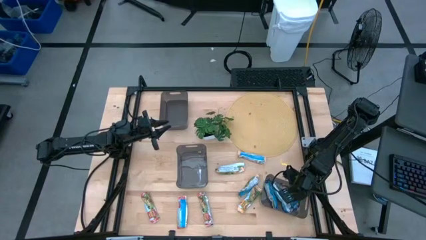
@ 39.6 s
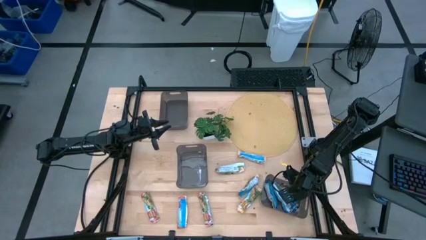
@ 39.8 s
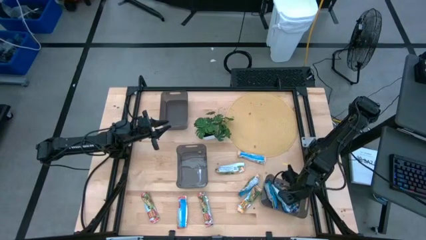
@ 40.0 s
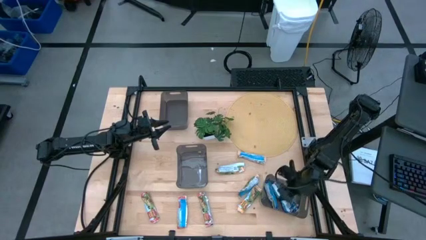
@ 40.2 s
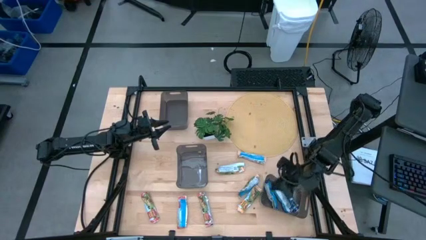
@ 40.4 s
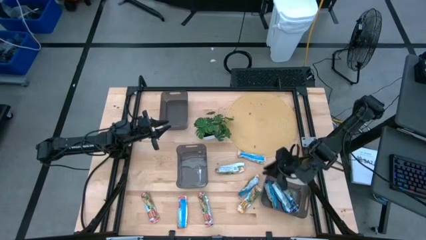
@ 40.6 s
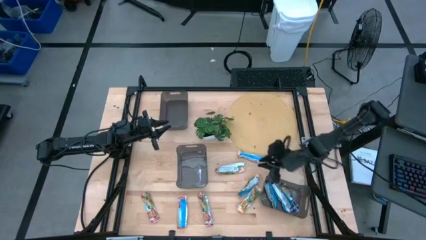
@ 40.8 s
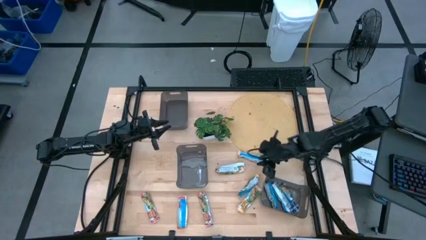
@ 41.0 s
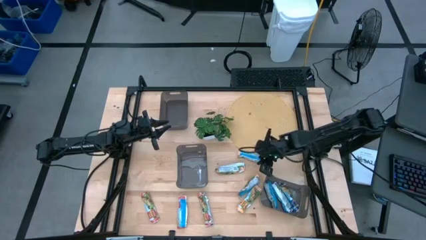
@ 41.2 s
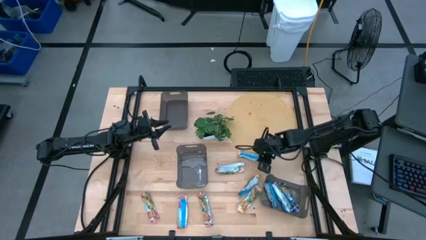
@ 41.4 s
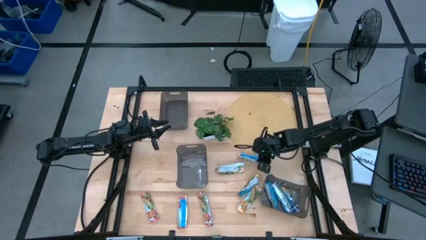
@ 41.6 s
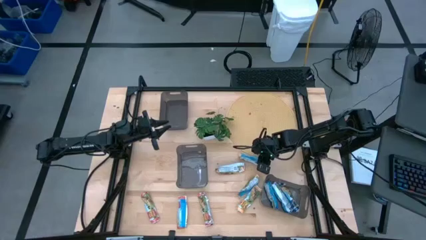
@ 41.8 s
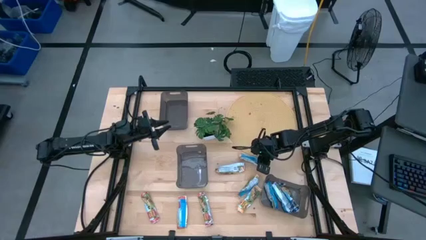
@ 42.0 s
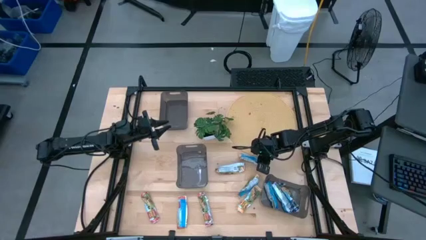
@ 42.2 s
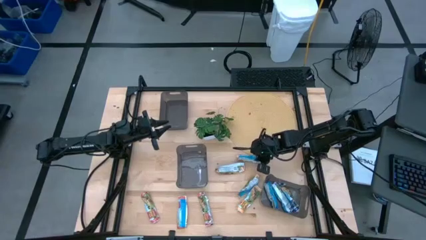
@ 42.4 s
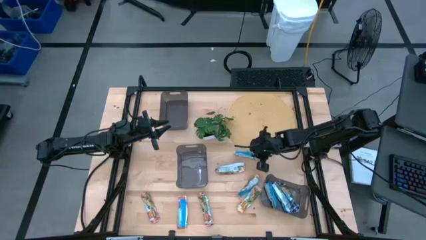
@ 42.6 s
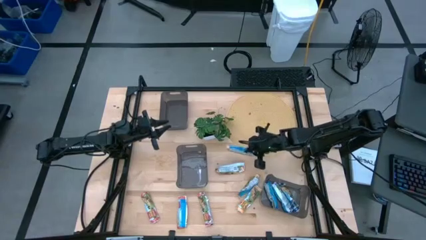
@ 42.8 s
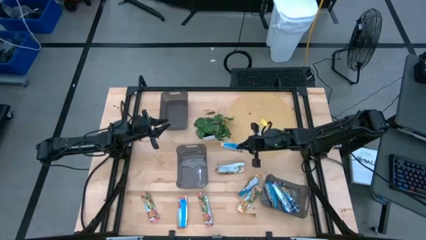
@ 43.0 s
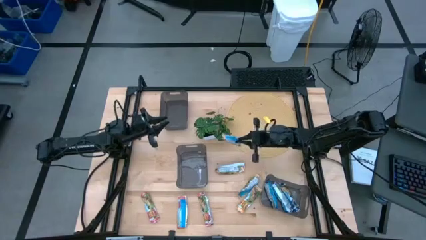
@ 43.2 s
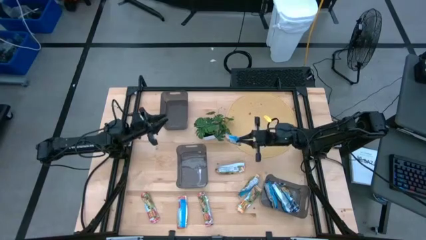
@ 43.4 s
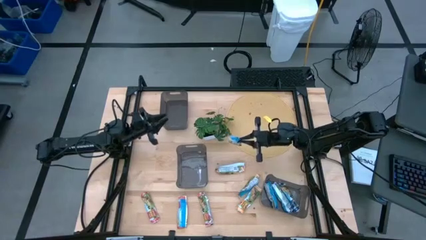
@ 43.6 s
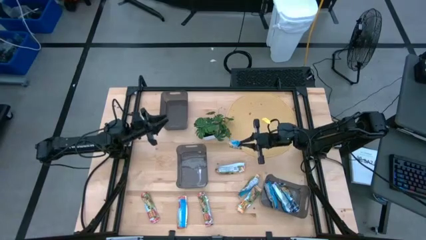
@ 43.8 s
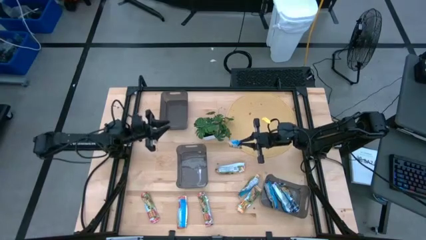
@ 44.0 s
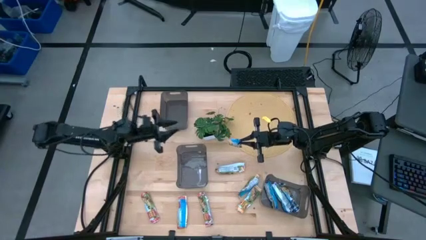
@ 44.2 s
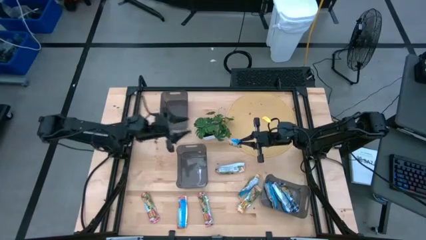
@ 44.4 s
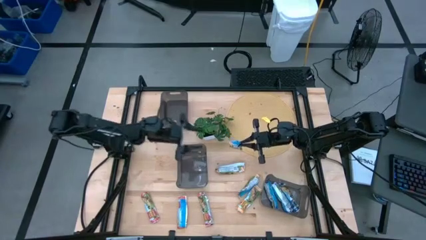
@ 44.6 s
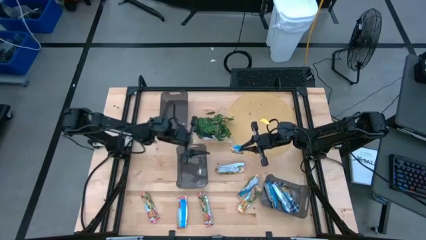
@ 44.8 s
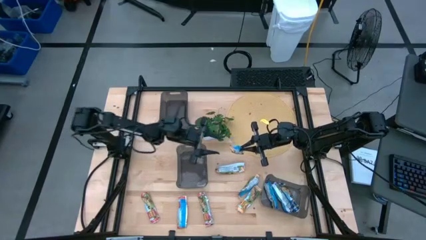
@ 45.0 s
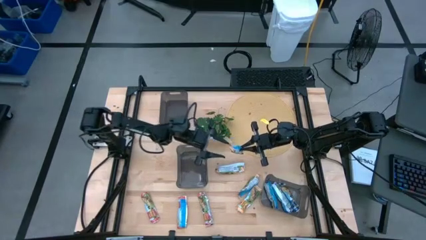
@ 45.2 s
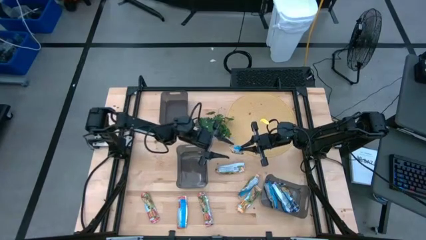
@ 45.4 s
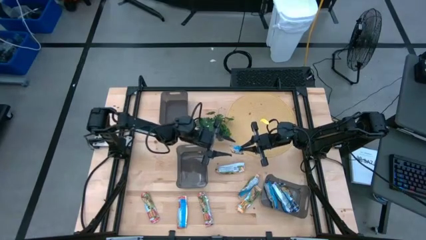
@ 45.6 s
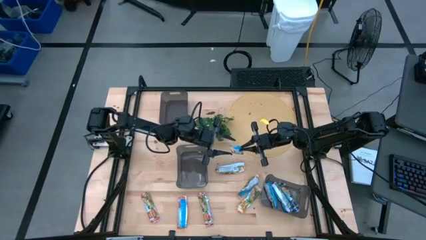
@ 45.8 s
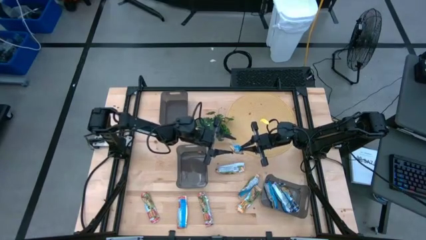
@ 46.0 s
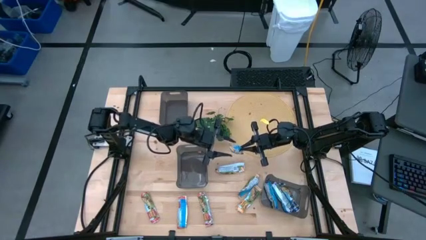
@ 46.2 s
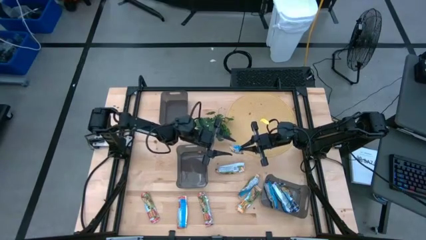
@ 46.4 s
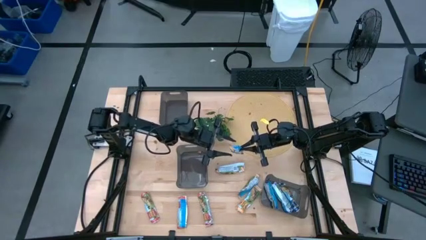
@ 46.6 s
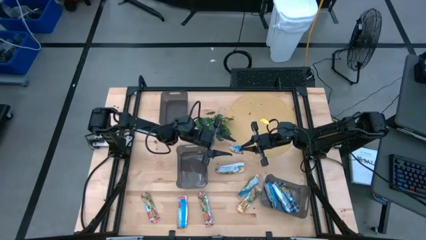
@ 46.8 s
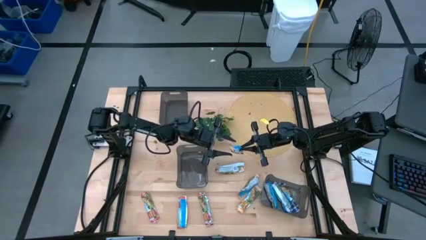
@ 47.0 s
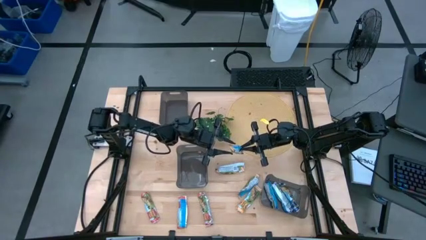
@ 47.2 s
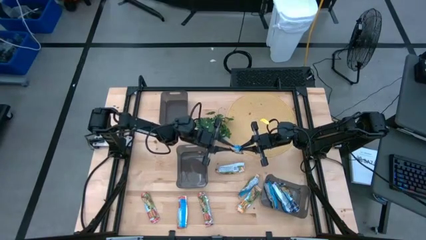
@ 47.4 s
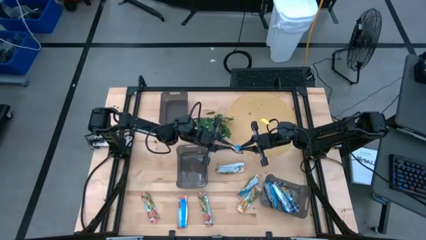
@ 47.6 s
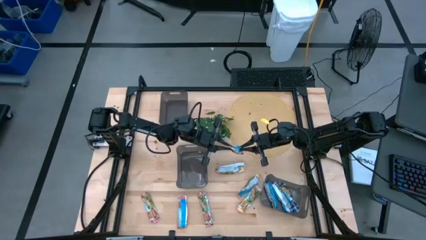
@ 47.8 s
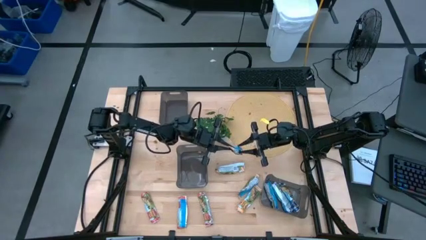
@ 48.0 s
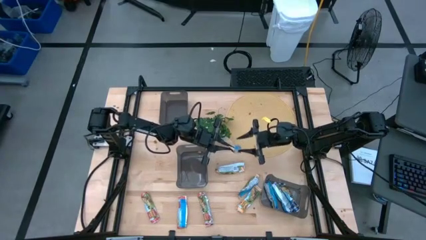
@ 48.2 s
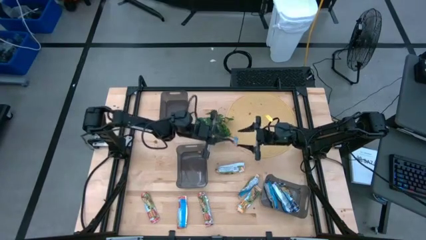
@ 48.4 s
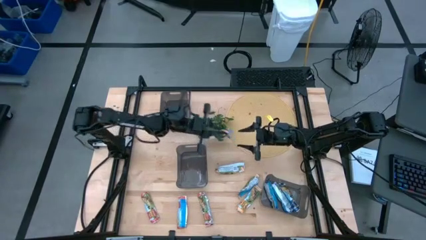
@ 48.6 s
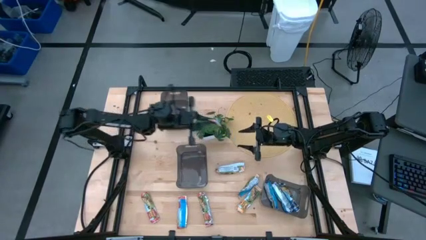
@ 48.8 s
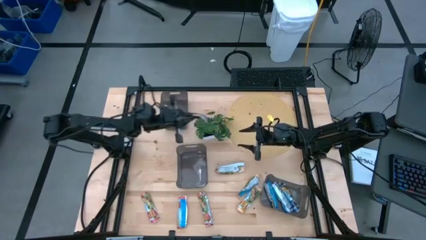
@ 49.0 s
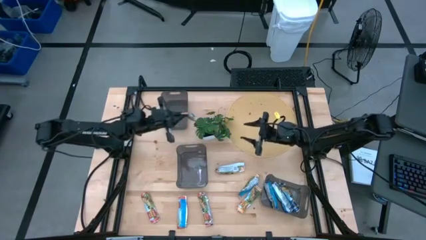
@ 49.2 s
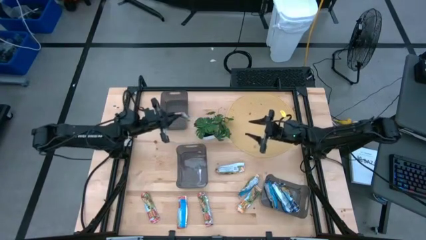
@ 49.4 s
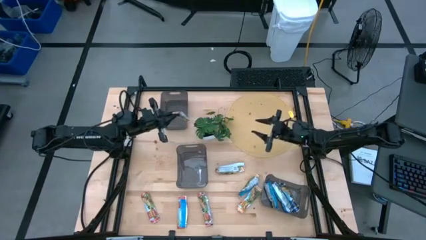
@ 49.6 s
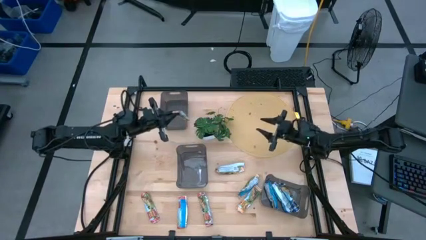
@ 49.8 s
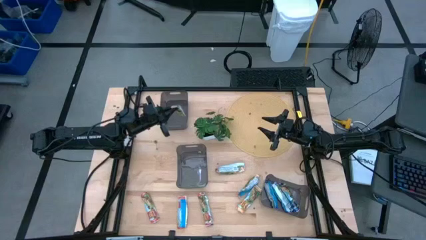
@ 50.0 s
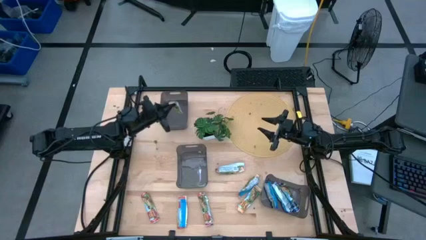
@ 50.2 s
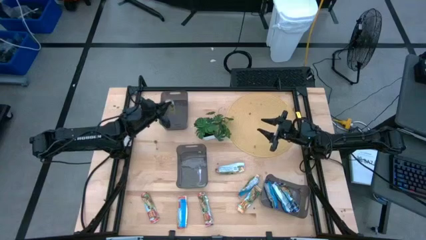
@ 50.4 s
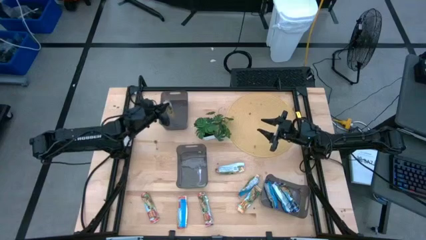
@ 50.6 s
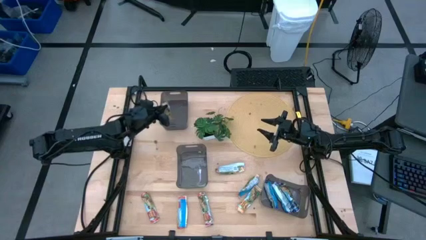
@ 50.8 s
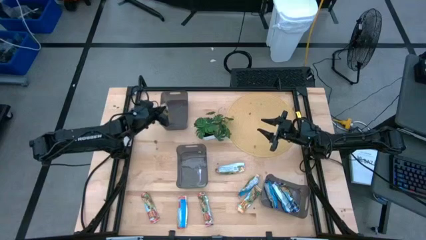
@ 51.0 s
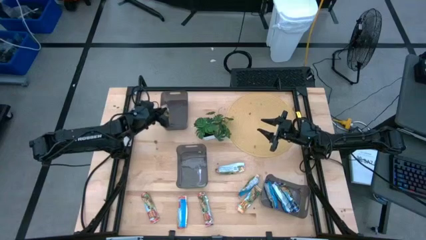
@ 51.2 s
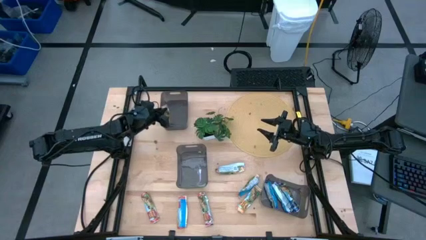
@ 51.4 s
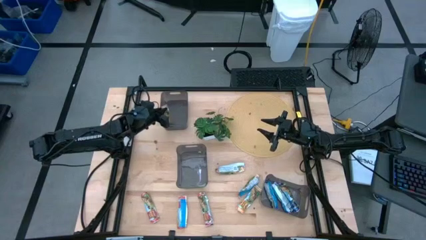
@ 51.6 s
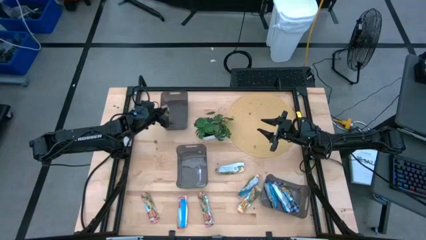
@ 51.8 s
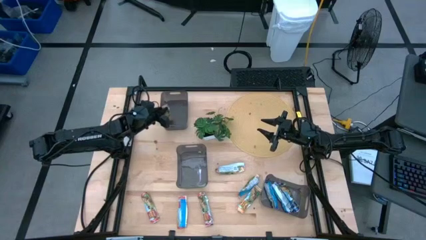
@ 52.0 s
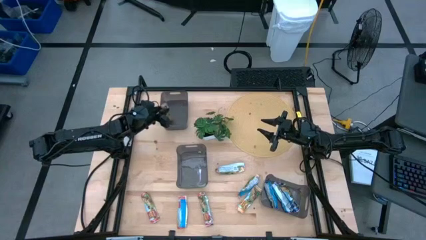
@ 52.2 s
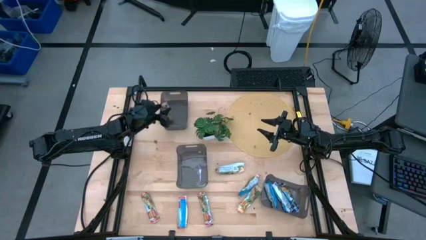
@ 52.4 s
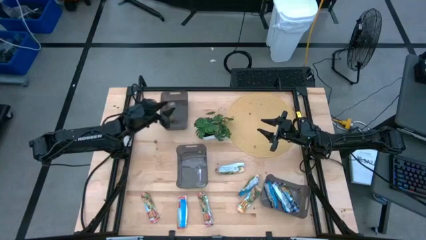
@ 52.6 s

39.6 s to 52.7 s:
Task: Pick and place Granola Bars by type
Put the orange granola bar into the top black bin
